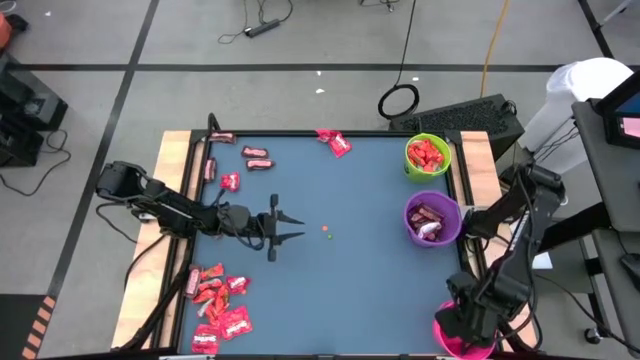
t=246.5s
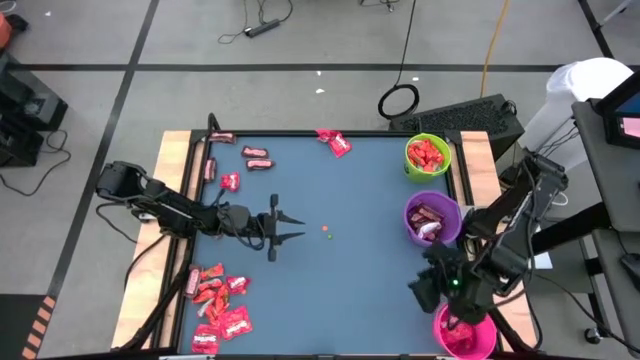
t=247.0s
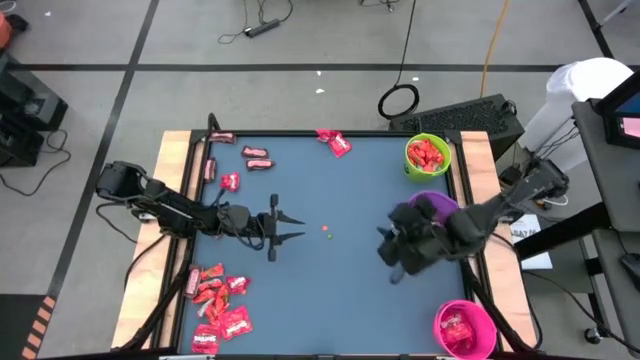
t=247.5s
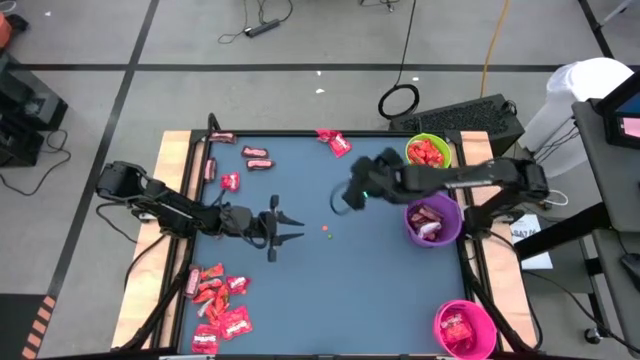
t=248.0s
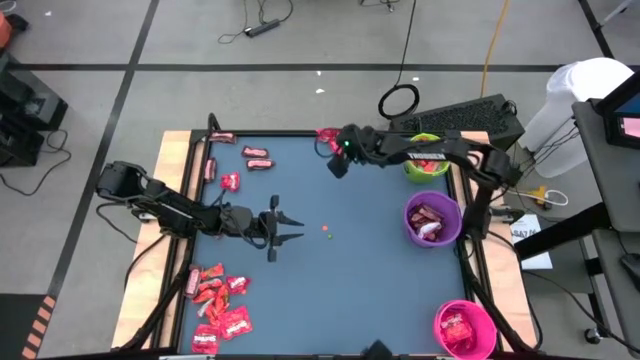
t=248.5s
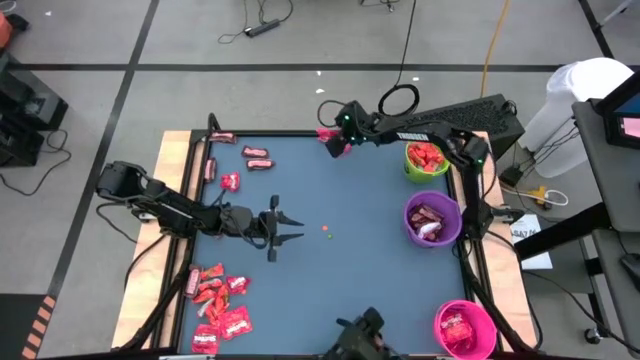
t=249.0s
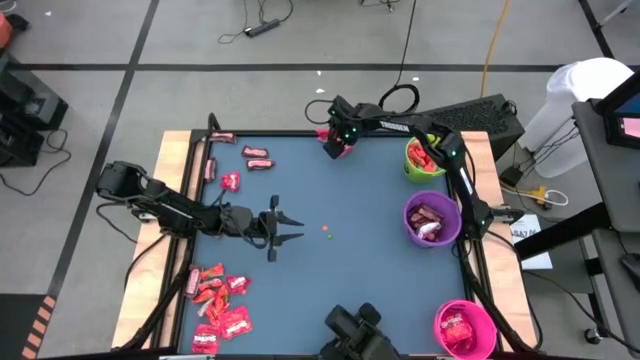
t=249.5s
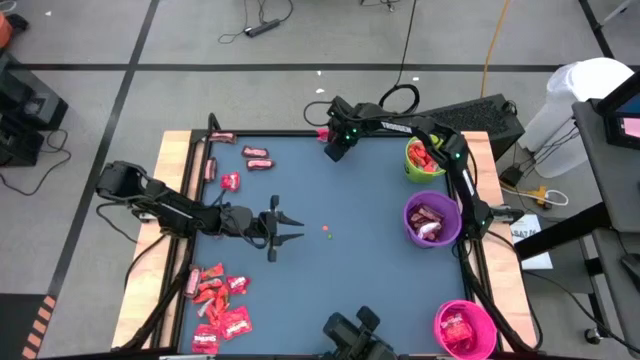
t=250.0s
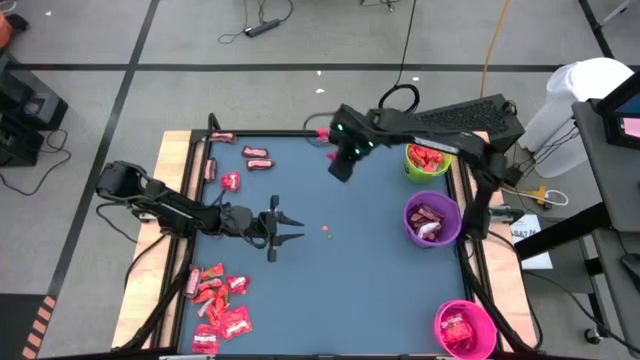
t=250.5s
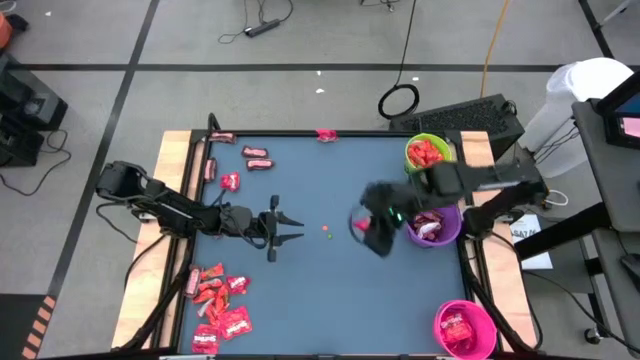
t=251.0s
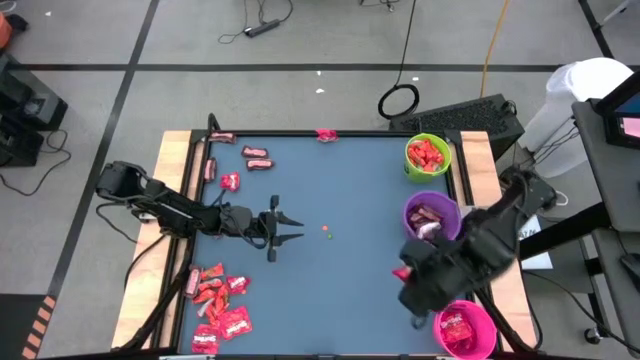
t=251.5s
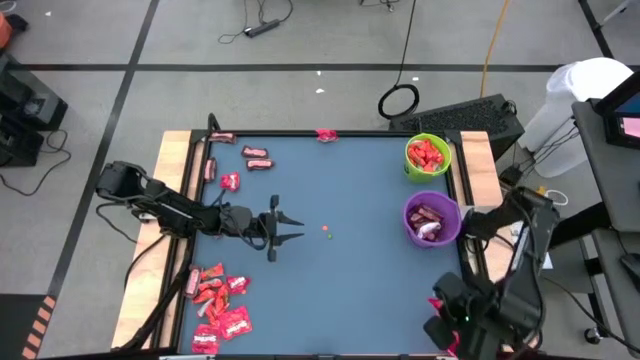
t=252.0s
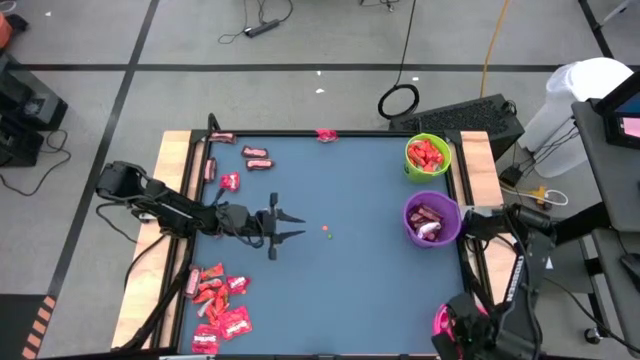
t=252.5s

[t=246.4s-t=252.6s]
Task: Organize candy in baskets
Put the red candy pack into the pink bucket

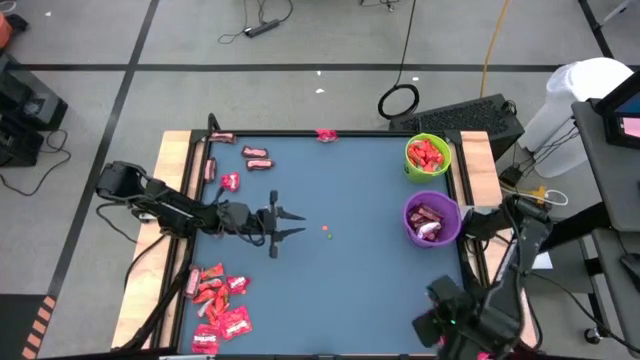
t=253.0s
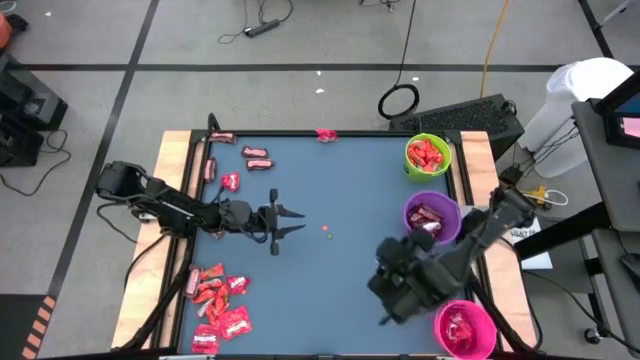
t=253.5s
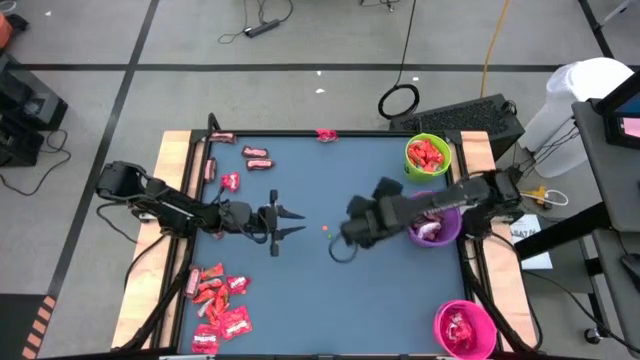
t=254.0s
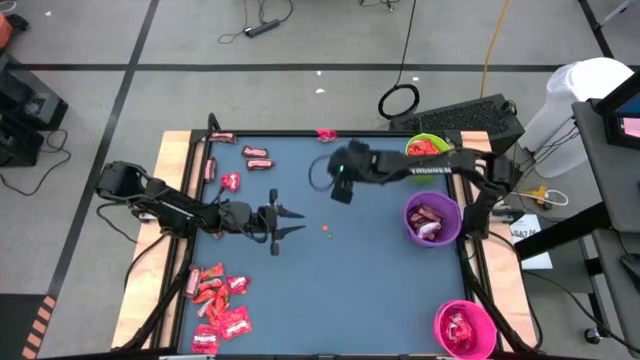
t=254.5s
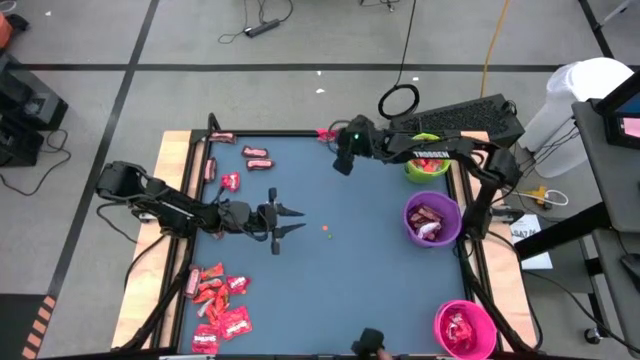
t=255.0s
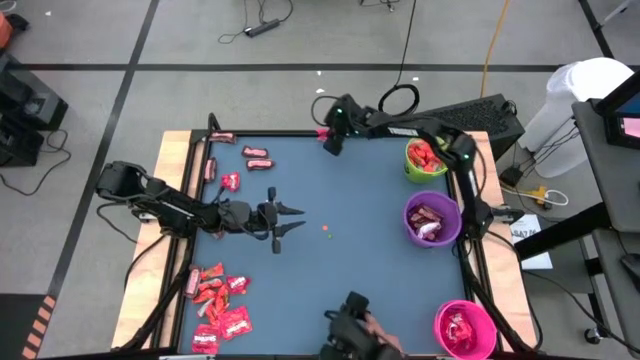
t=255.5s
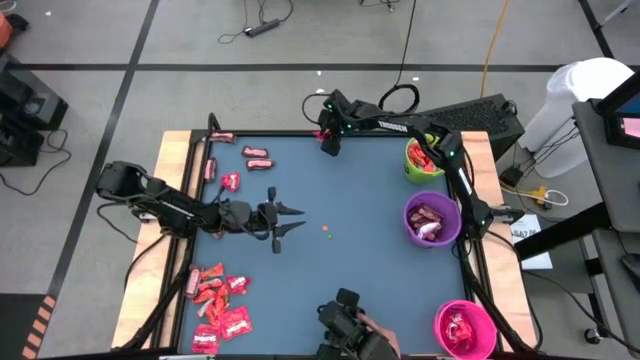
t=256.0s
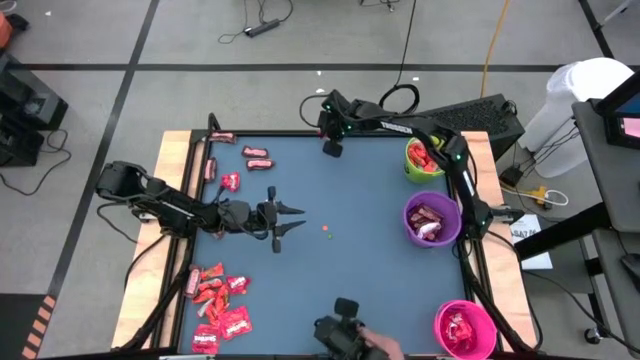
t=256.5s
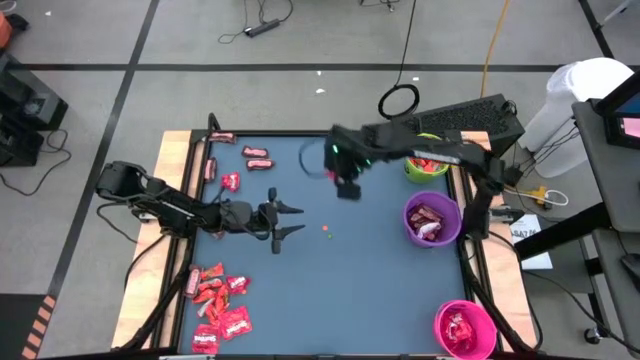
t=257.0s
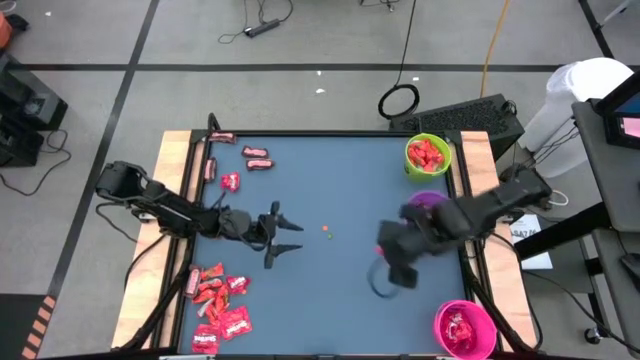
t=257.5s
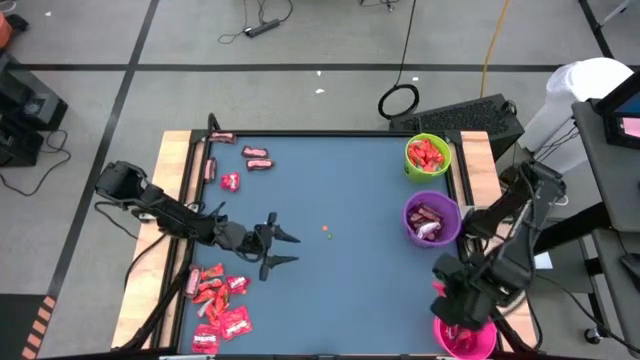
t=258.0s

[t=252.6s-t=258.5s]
Put the red candy pack into the pink bucket

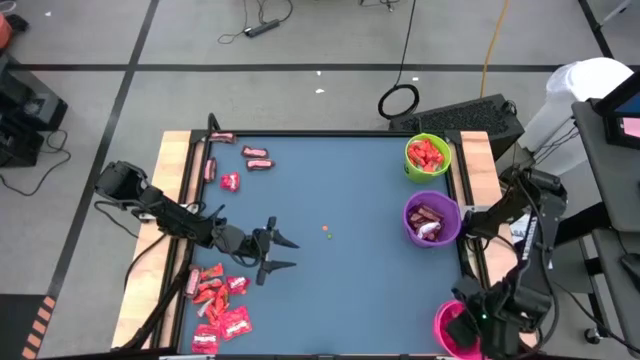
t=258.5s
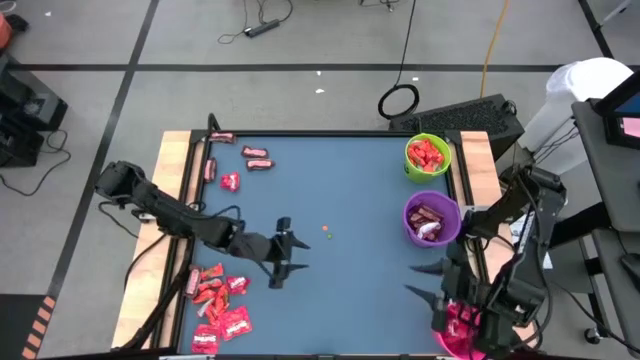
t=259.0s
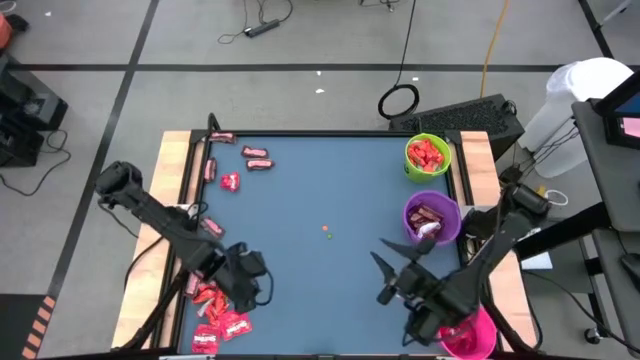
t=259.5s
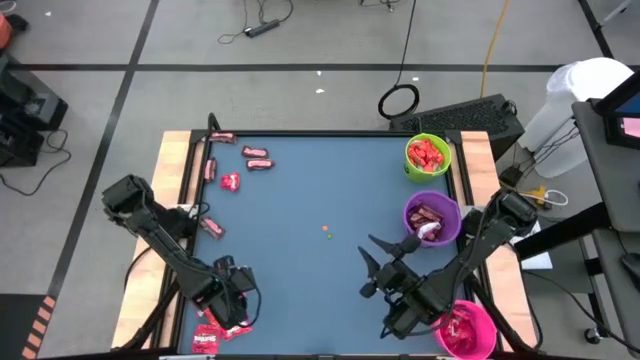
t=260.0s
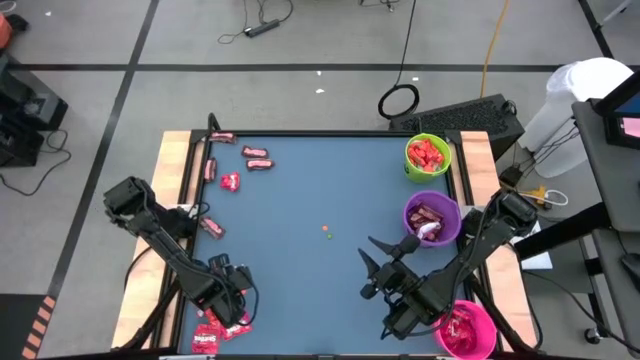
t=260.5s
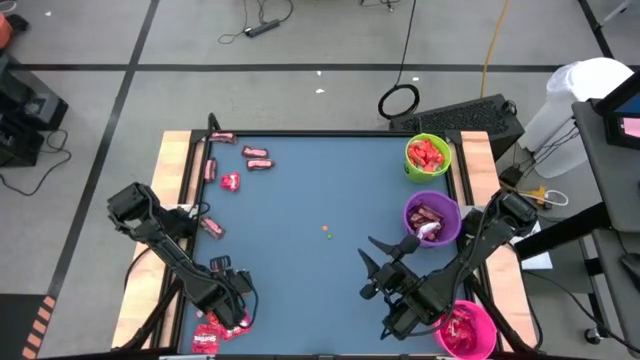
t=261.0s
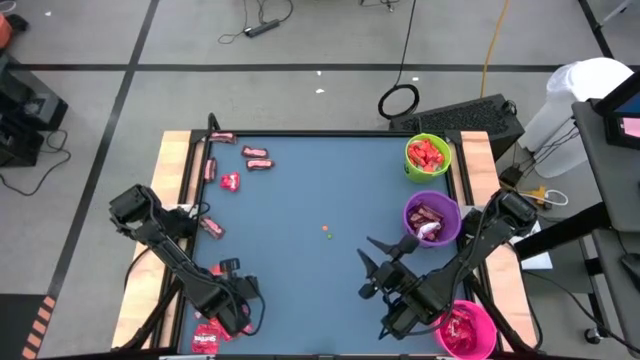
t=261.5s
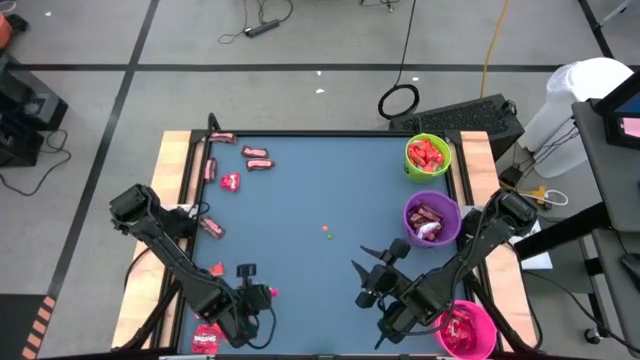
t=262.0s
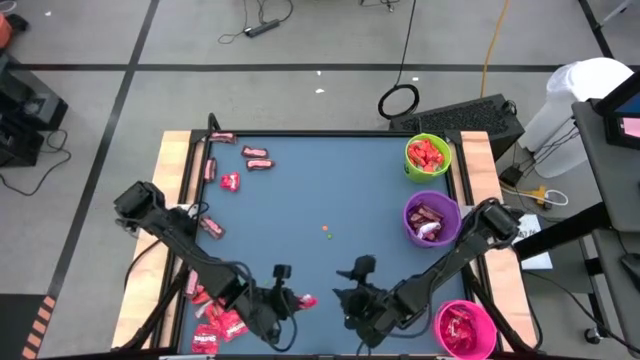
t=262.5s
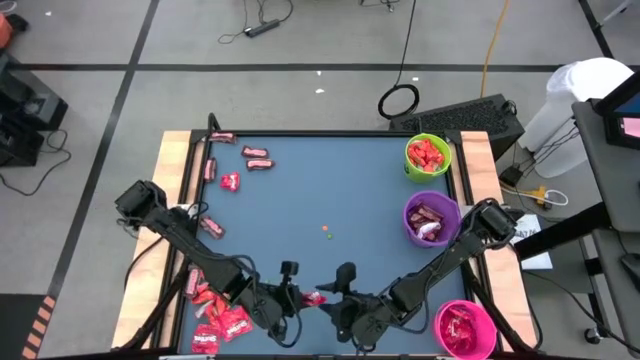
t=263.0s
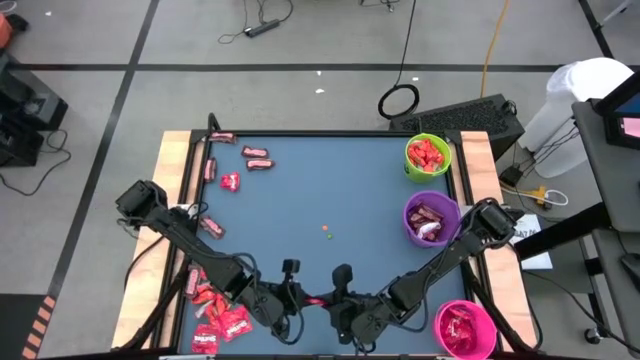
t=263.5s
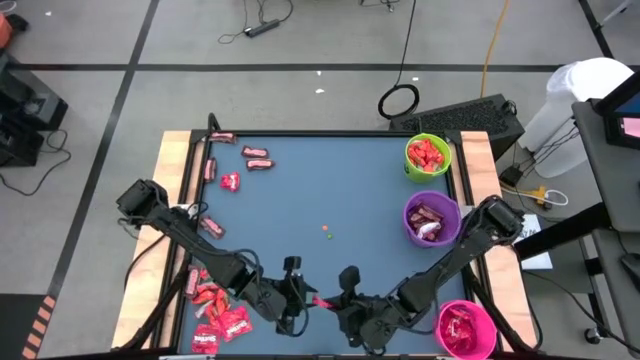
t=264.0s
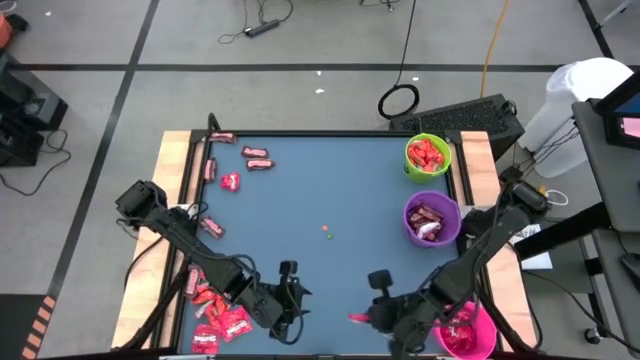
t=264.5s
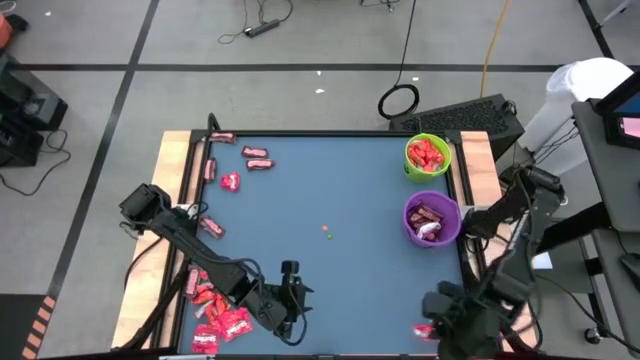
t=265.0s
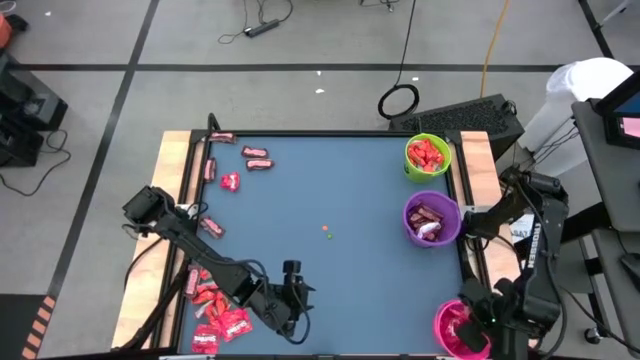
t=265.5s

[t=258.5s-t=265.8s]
Put the red candy pack into the pink bucket
